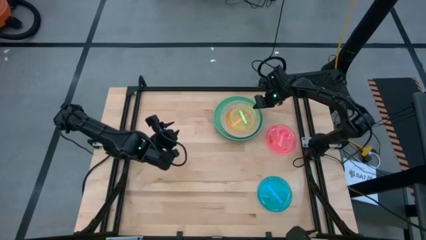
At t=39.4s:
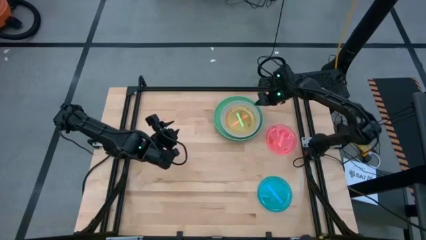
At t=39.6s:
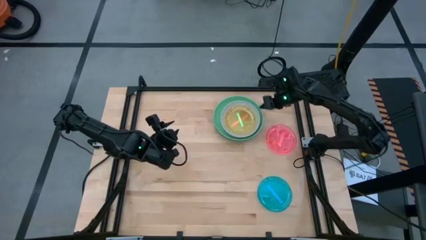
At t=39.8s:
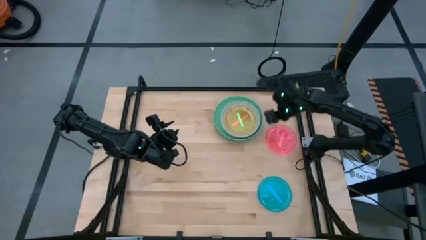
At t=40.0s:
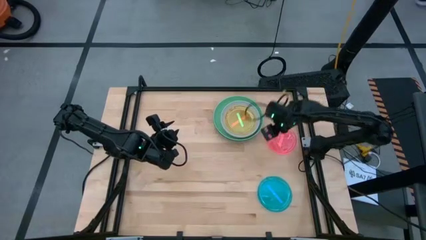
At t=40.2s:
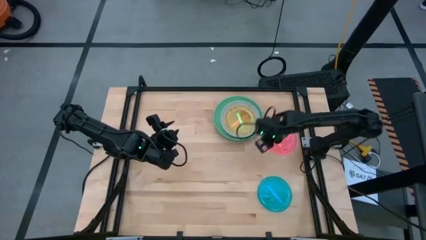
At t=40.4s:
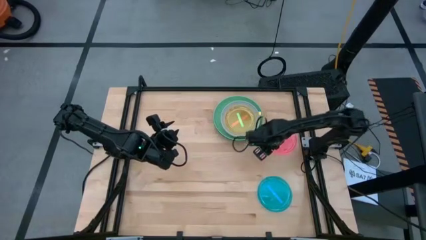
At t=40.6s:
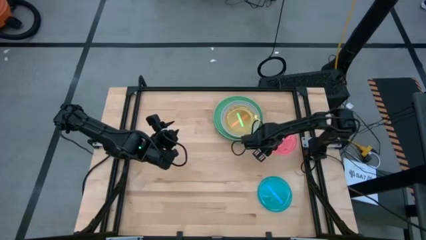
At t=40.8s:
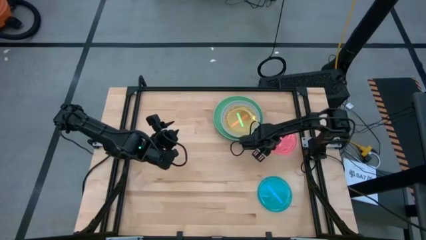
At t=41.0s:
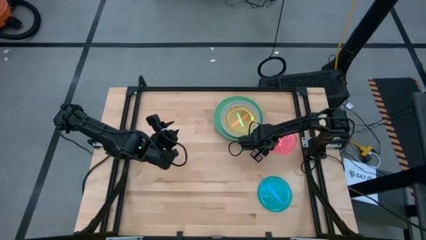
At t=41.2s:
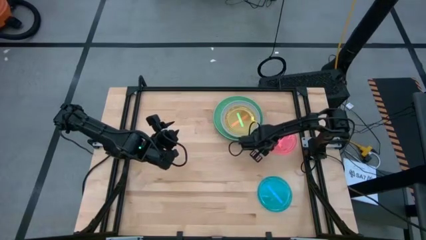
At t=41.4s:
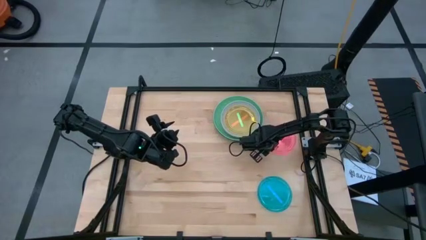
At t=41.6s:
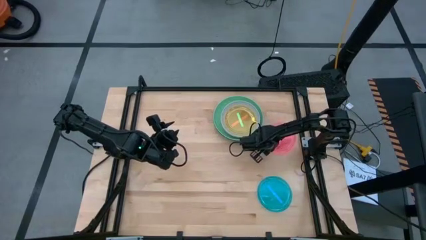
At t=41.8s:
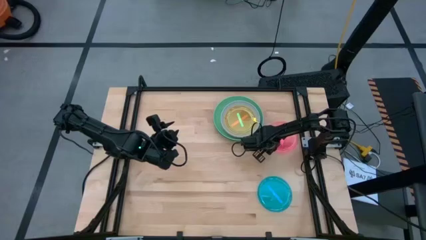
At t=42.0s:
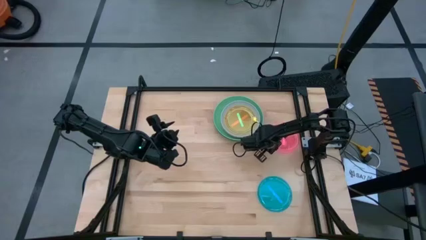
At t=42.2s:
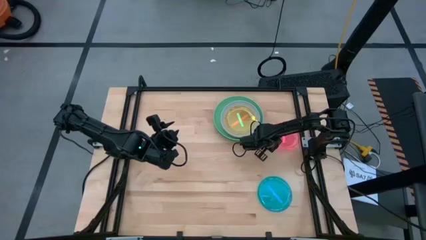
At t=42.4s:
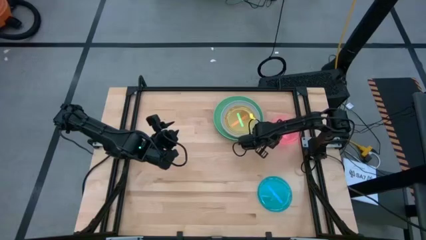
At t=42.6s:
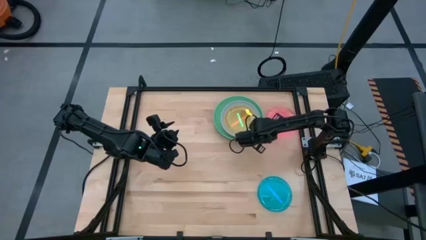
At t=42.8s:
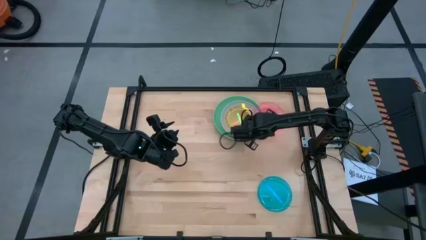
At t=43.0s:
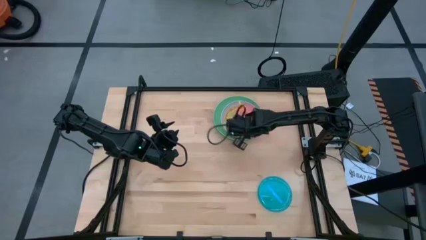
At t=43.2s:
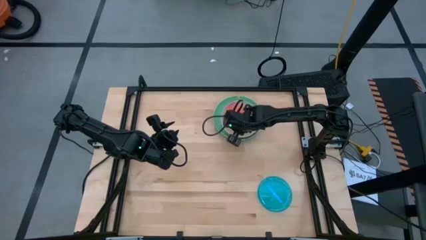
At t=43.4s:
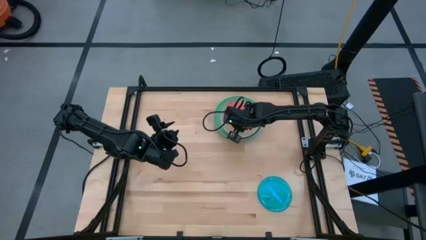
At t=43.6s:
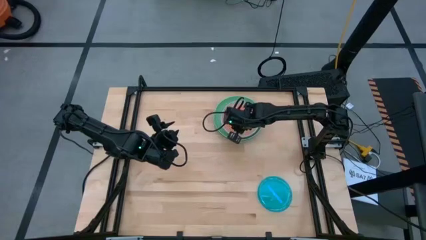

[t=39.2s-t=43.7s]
Task: Stack plastic plates
Stack the pink plate on top of the light green plate

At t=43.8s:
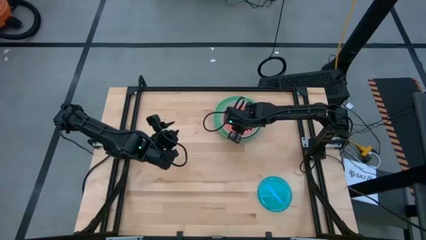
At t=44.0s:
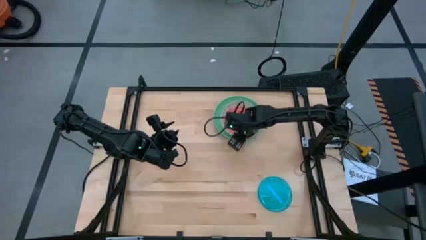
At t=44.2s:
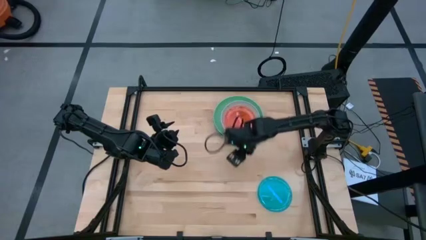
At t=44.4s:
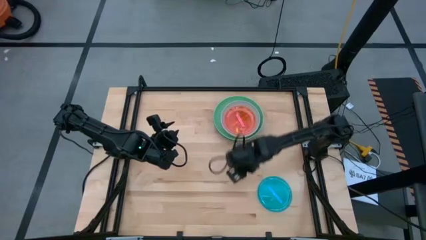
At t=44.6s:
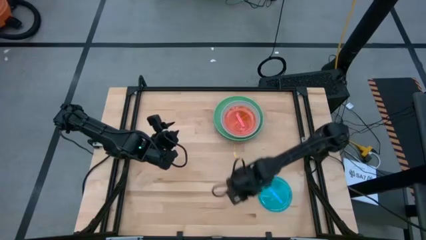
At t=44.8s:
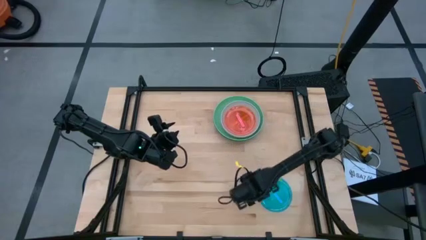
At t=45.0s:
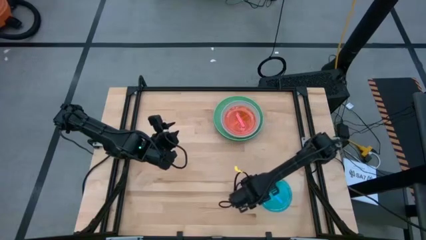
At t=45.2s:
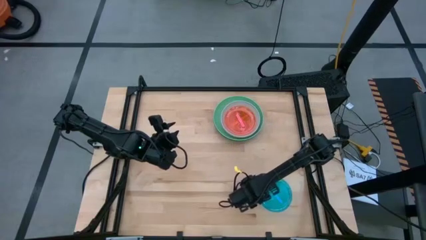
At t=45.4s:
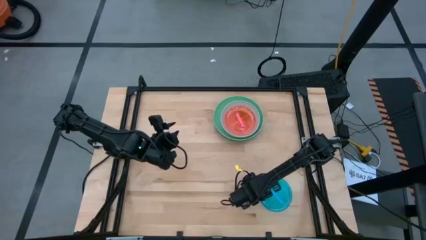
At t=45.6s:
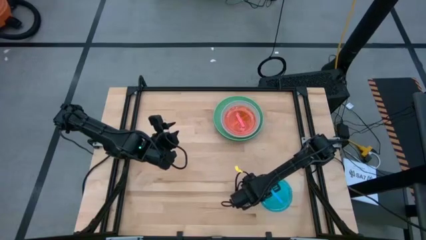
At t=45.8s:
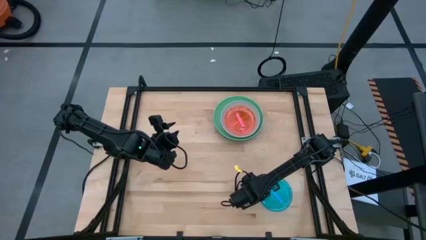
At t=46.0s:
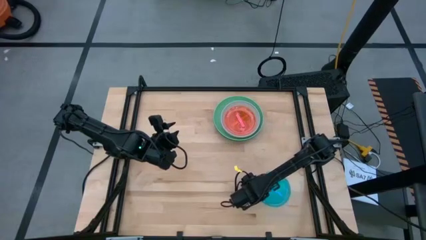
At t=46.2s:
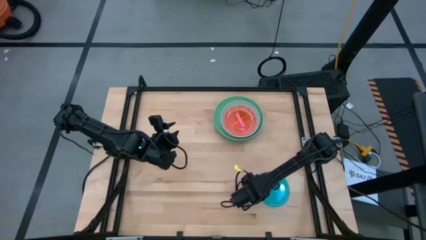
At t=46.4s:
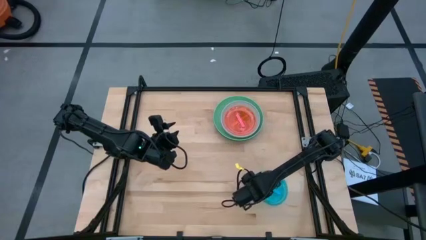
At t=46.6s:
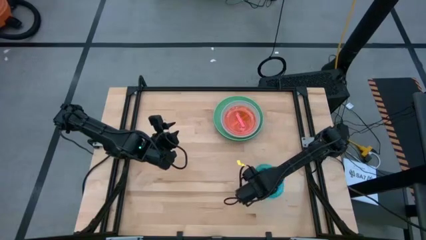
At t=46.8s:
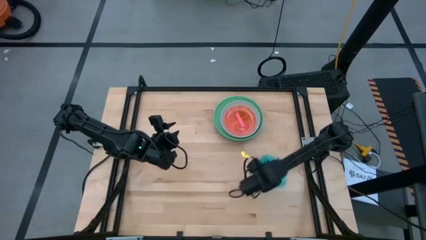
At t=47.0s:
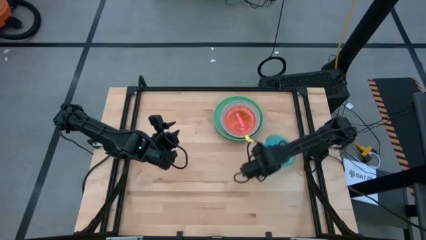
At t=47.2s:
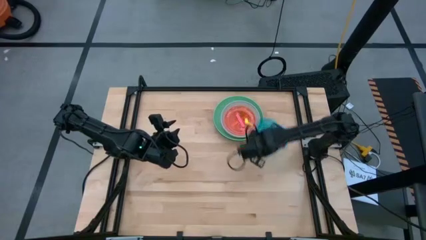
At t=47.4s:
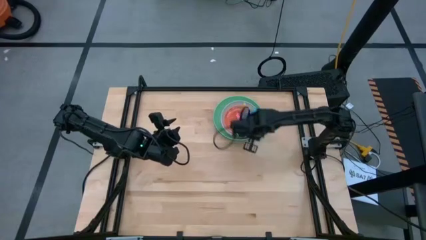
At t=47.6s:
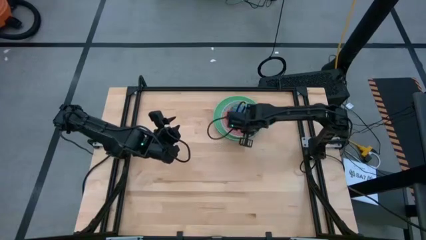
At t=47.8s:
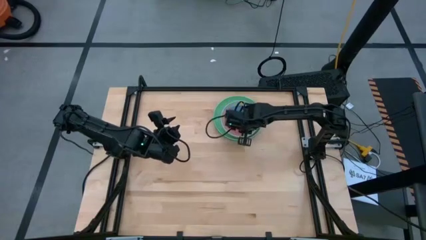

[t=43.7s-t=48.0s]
Stack the blue plate on top of the pink plate

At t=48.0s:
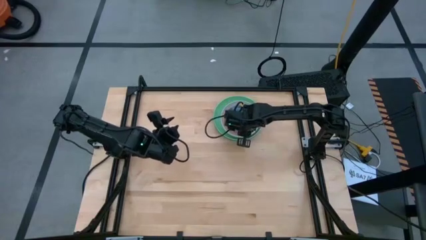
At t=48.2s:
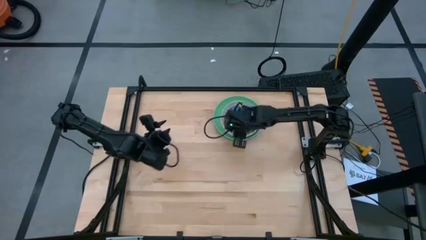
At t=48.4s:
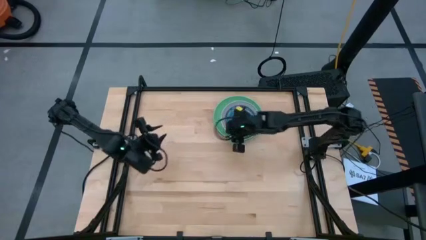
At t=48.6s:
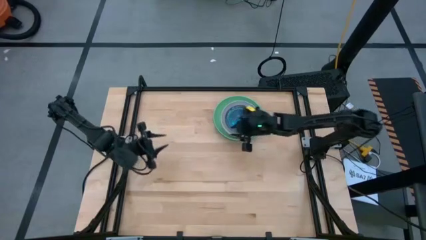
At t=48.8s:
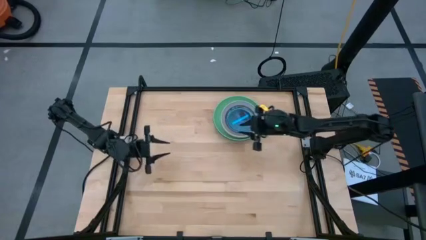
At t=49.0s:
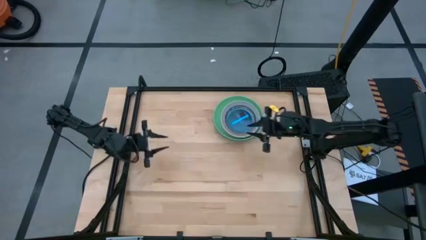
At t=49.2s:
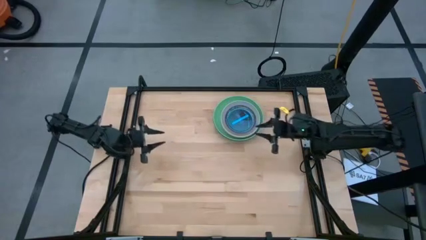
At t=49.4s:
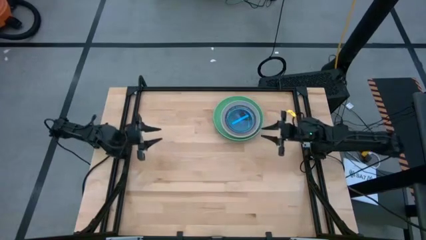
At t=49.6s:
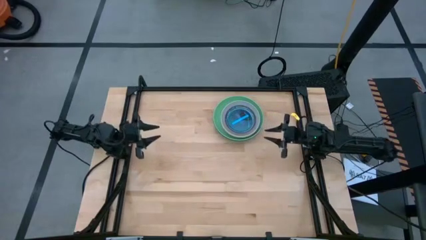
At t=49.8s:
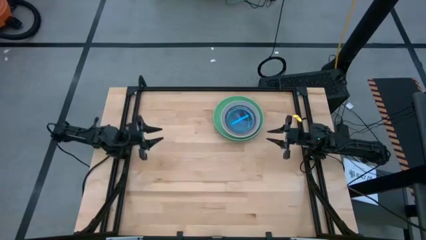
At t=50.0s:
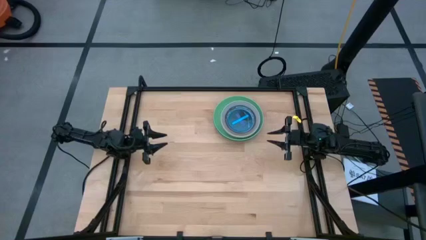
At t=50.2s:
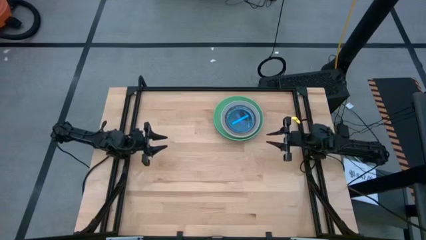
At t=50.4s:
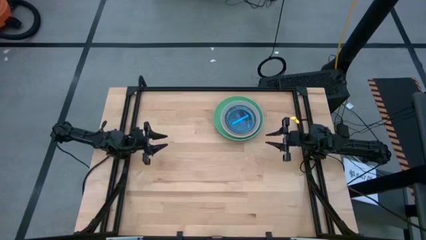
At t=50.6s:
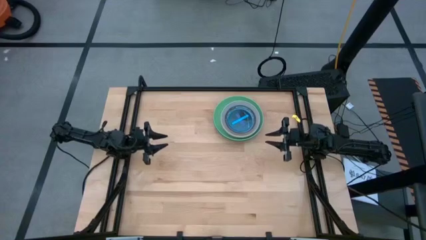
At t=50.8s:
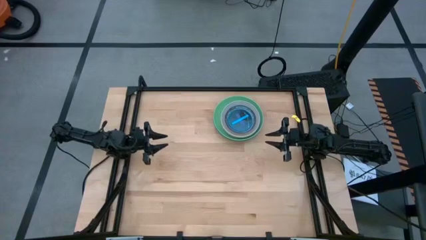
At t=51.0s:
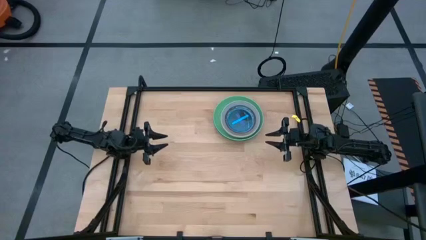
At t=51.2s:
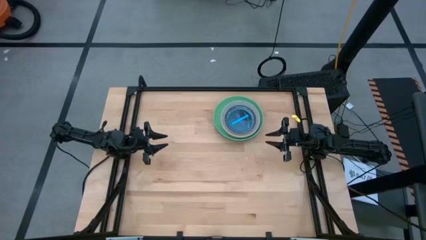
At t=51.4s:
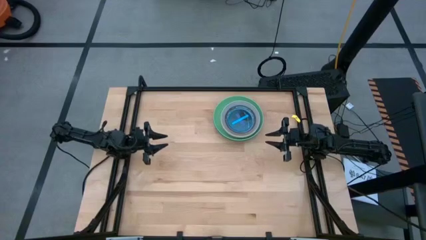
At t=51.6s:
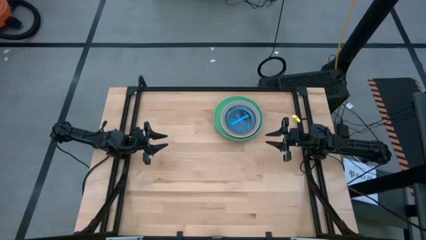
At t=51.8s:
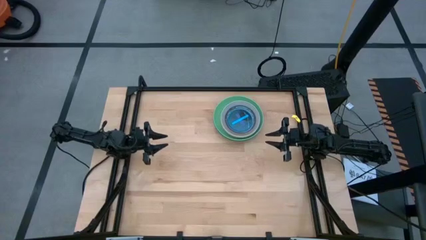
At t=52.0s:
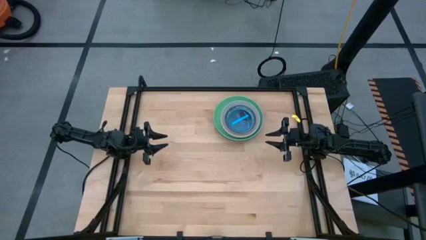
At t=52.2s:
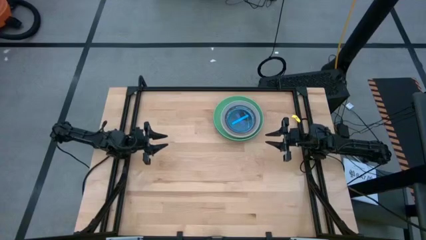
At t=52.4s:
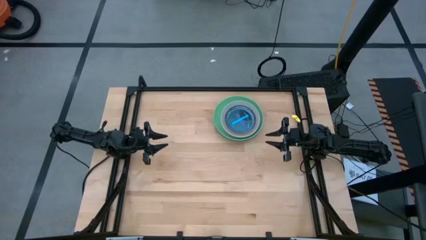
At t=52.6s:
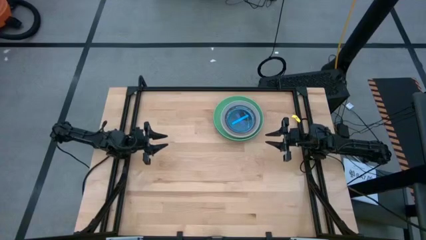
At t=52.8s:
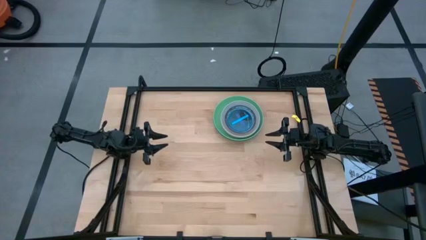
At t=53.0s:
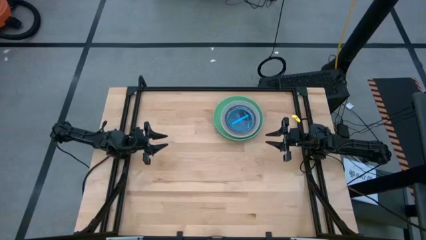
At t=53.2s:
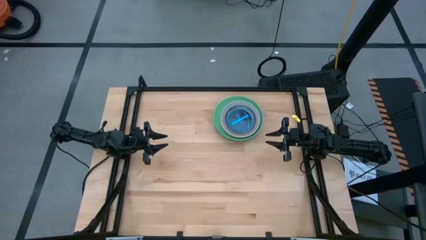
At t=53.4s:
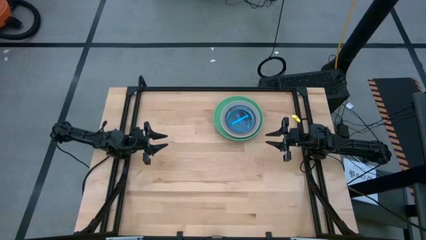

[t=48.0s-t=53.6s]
Return to Home Position
